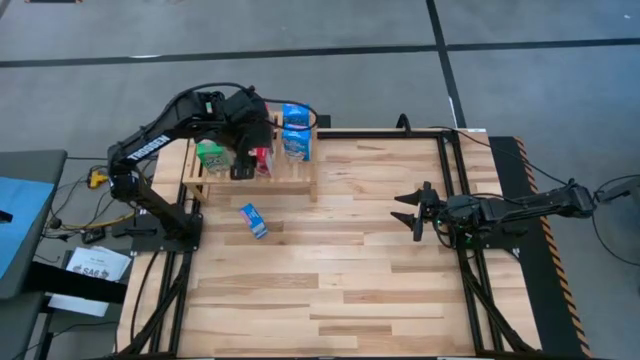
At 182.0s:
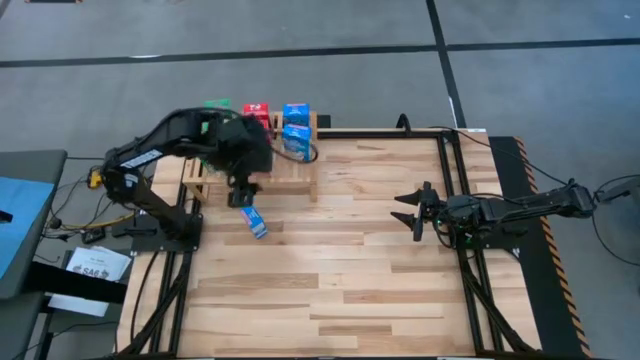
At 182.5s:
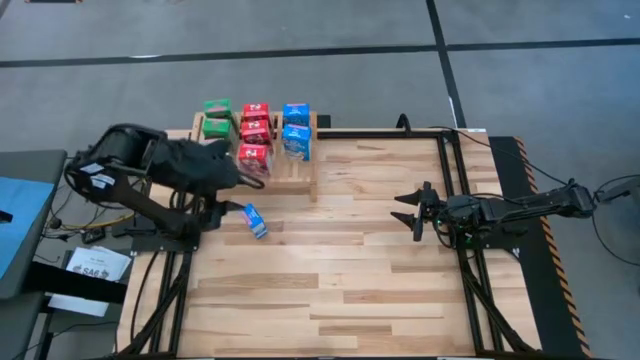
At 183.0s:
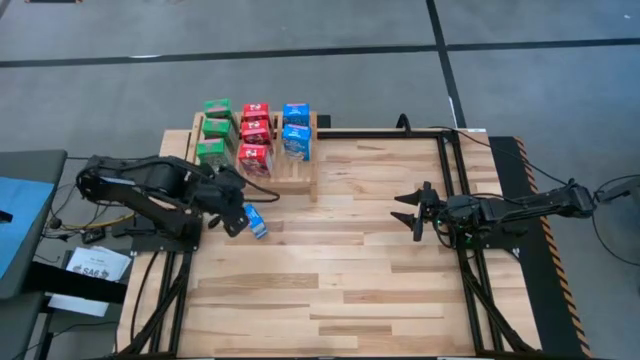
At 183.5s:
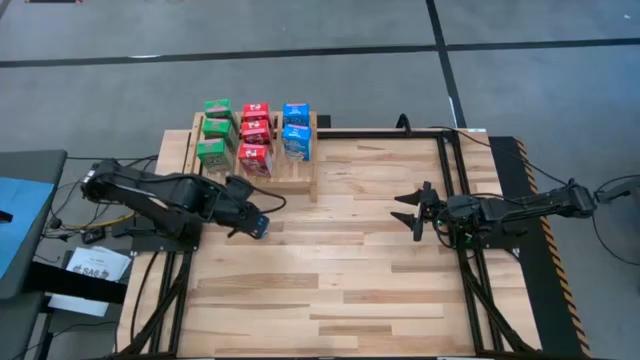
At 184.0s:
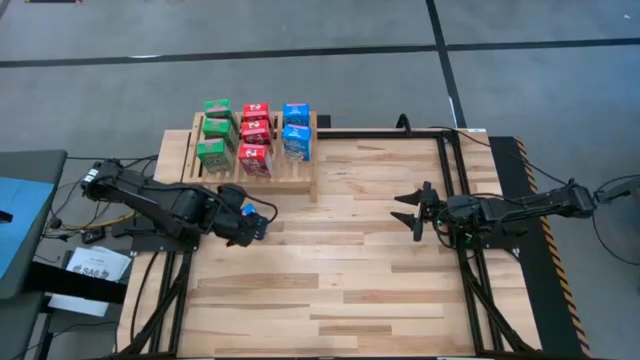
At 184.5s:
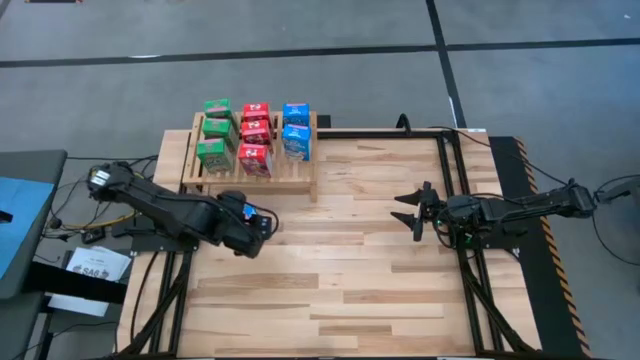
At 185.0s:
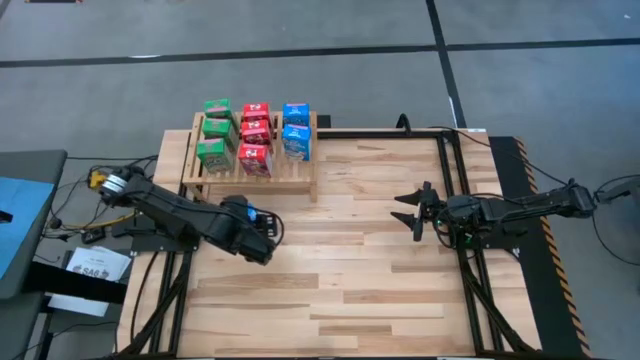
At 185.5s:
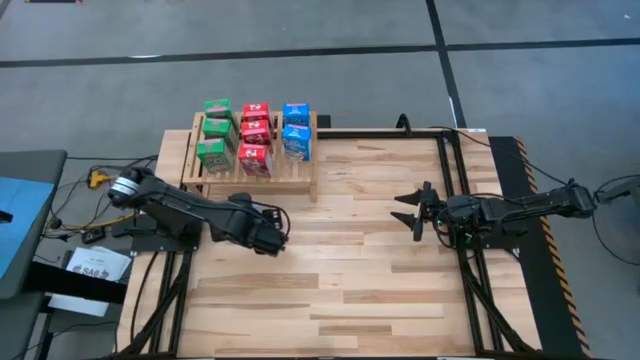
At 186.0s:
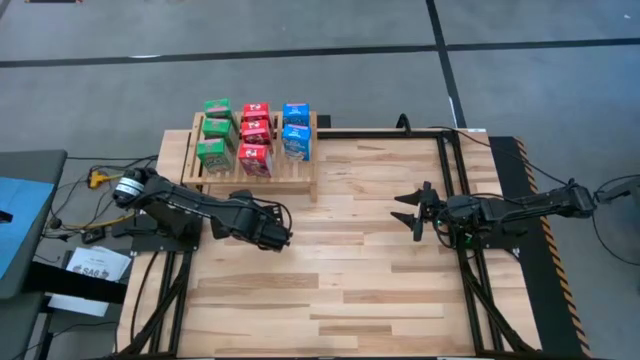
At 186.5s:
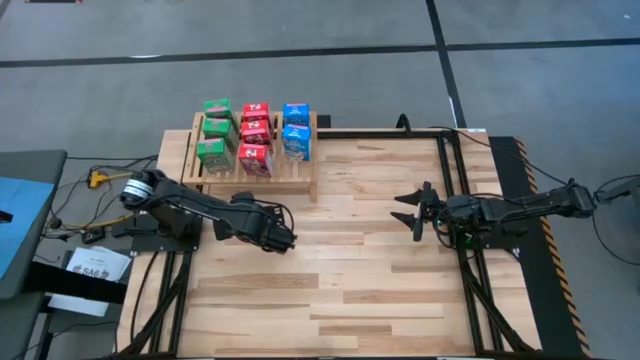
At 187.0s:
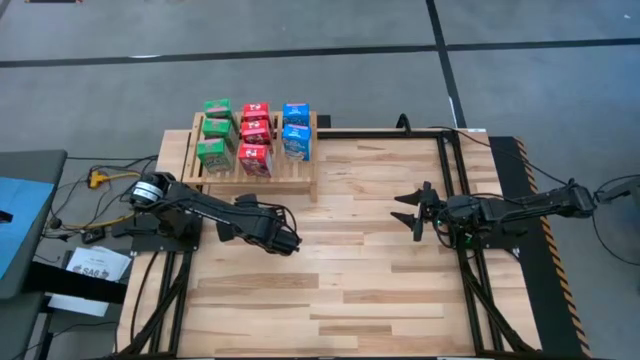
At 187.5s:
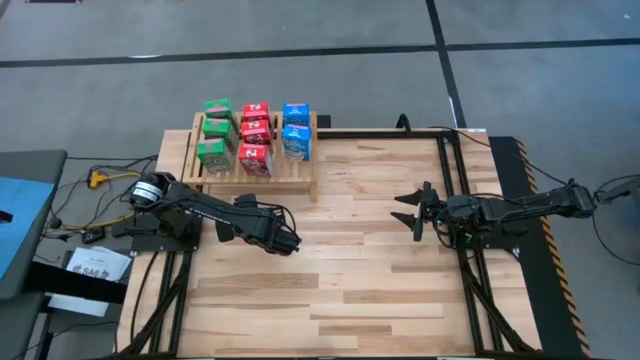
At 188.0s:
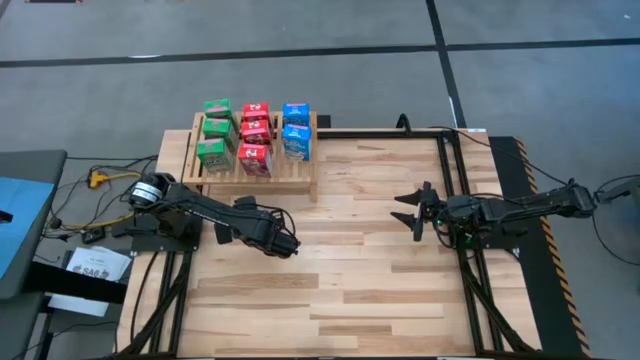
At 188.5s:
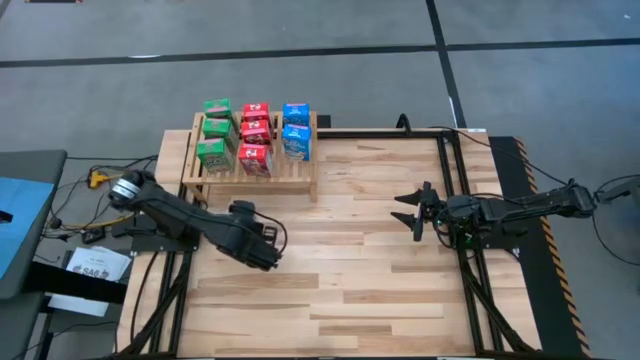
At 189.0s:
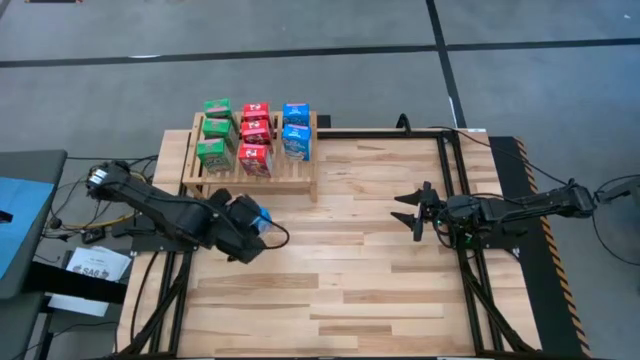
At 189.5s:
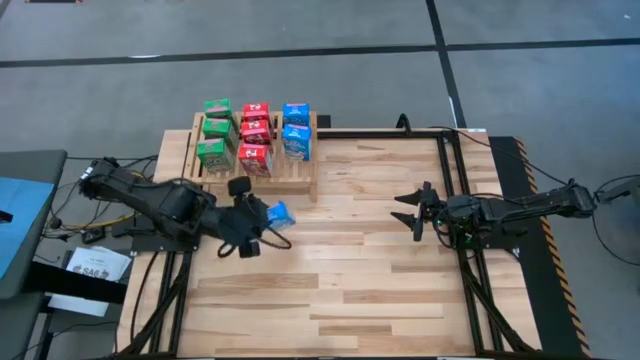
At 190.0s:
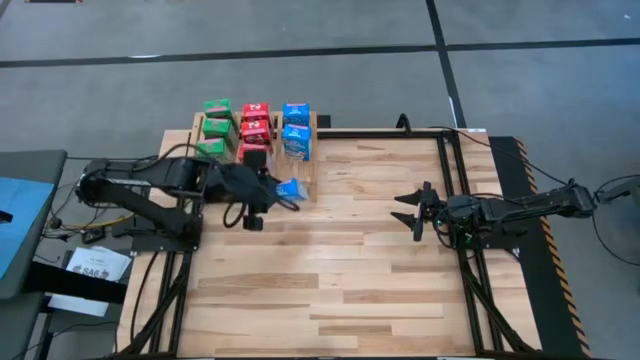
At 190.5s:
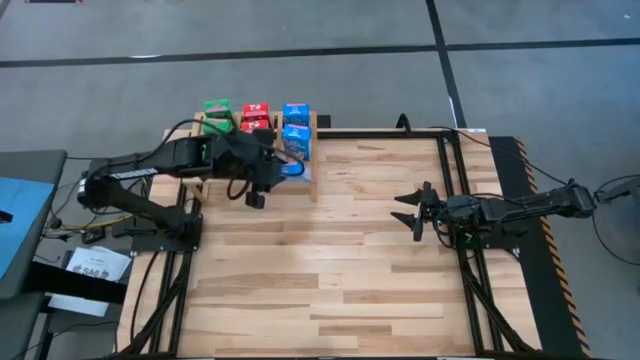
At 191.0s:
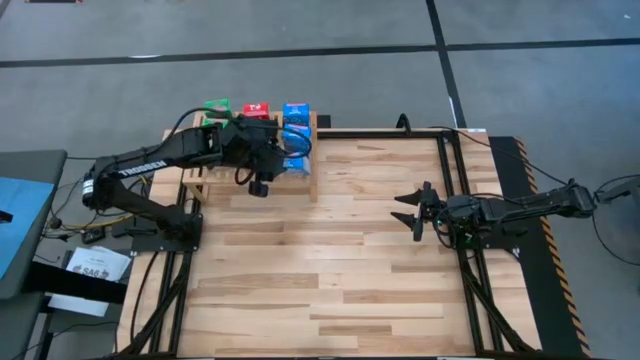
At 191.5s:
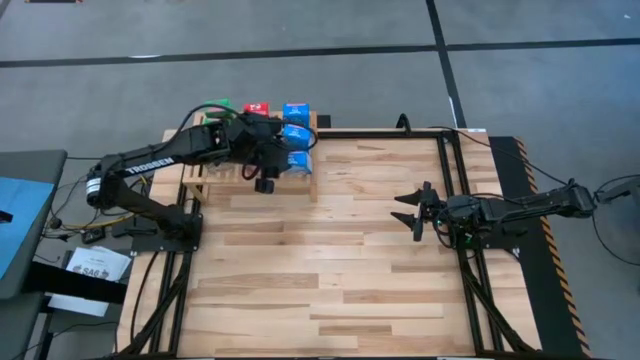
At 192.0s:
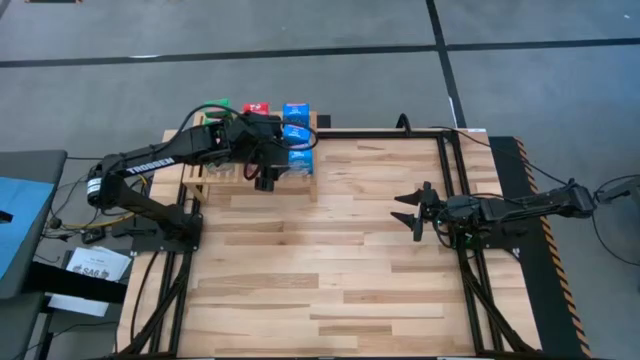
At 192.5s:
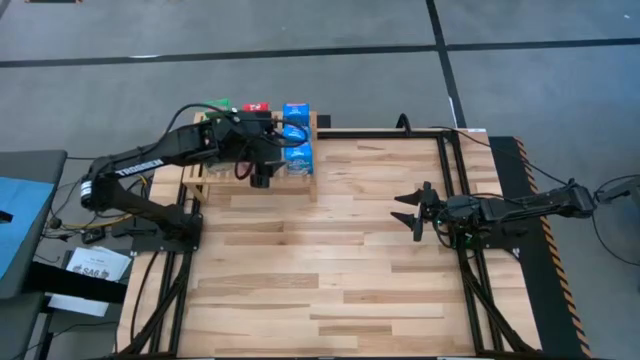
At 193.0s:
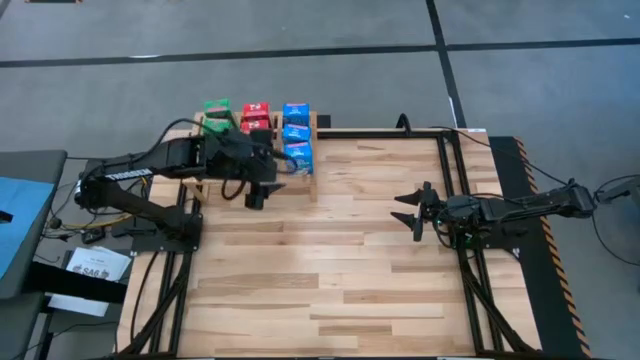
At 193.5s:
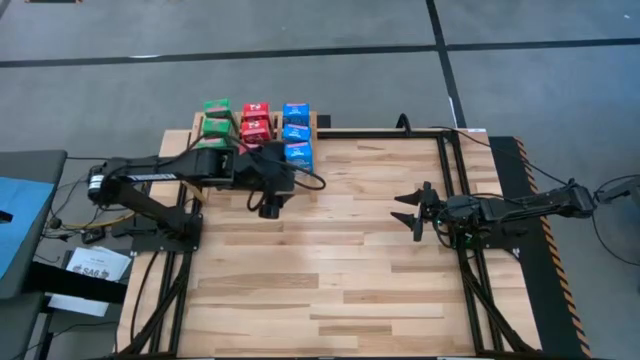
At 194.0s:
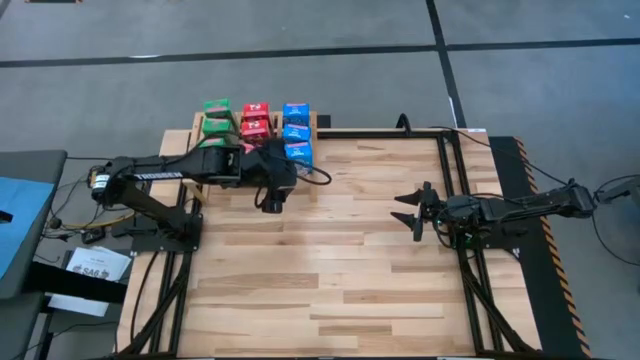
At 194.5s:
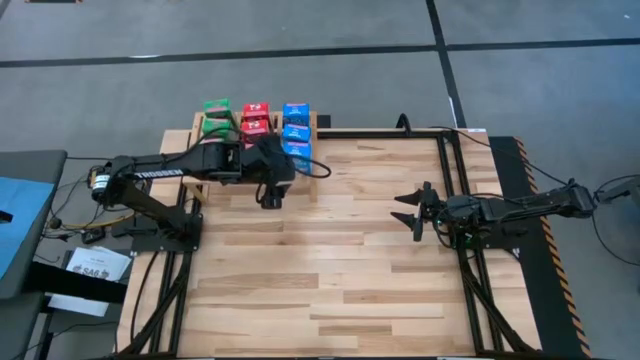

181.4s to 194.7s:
Task: Stack cereal on shelf
Put the blue cereal on the shelf aligned with the other blue cereal box

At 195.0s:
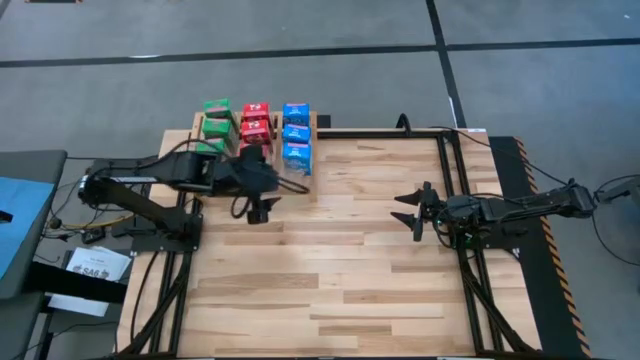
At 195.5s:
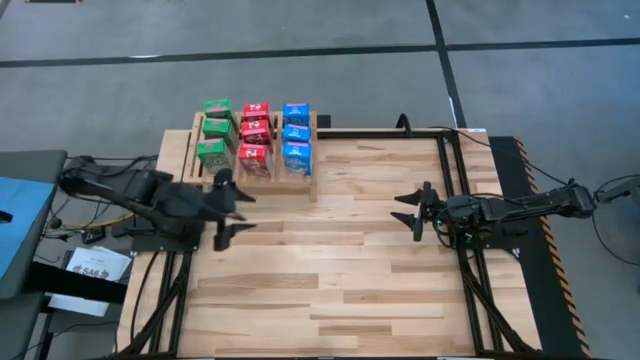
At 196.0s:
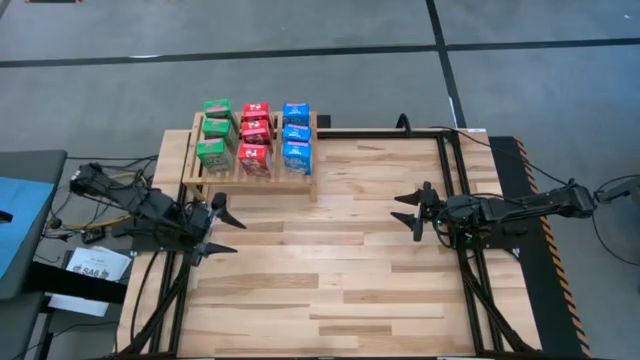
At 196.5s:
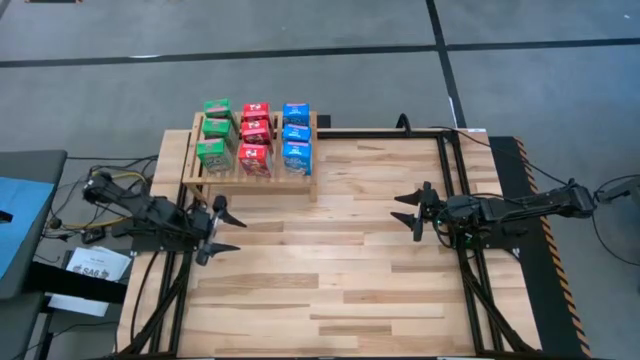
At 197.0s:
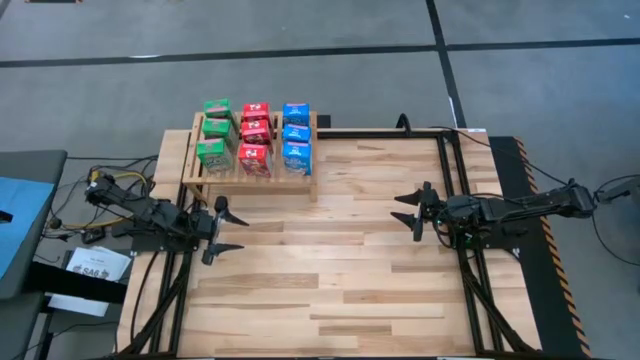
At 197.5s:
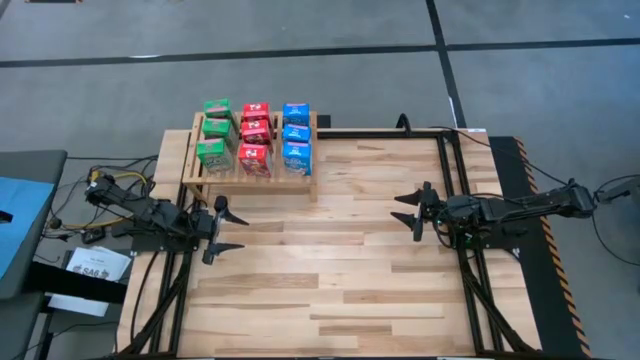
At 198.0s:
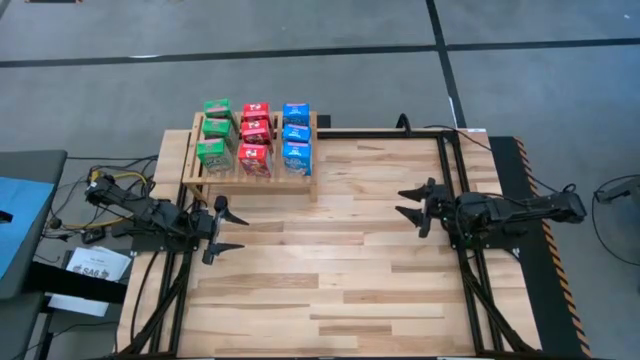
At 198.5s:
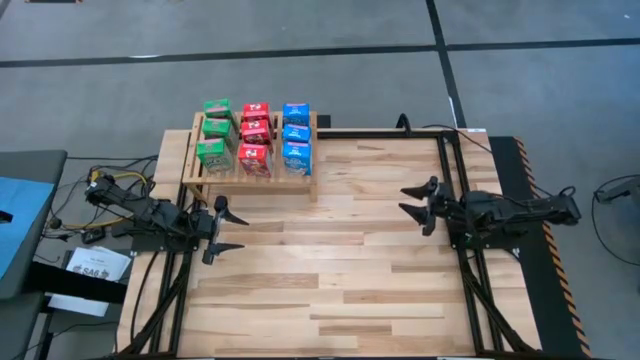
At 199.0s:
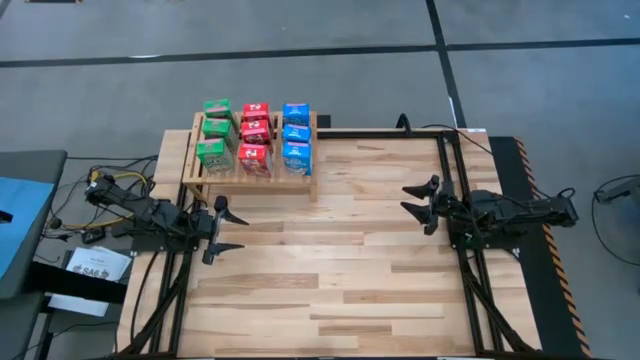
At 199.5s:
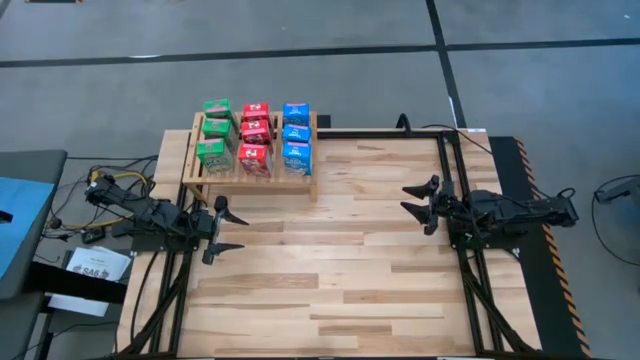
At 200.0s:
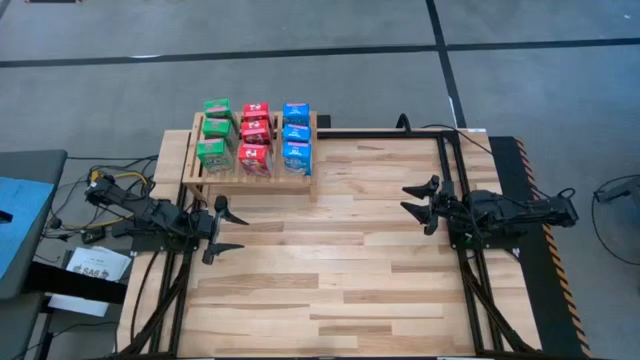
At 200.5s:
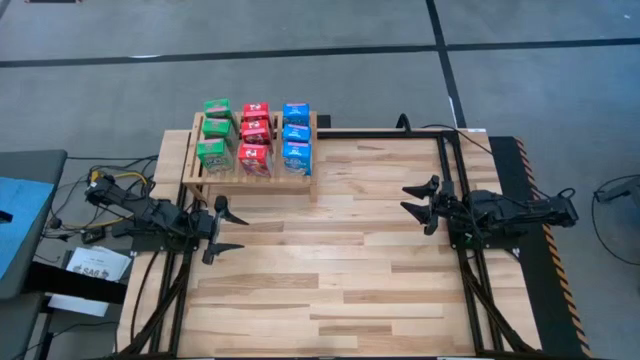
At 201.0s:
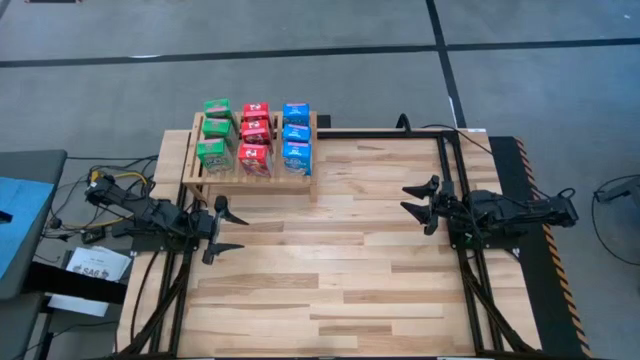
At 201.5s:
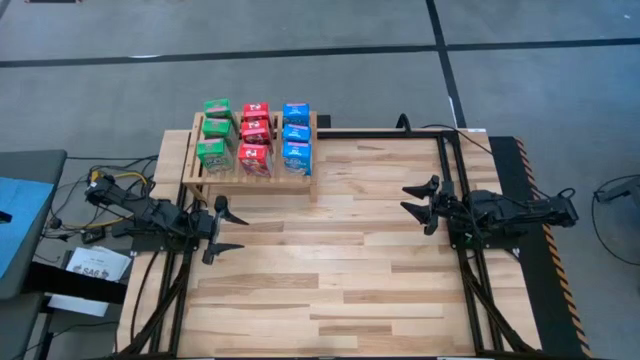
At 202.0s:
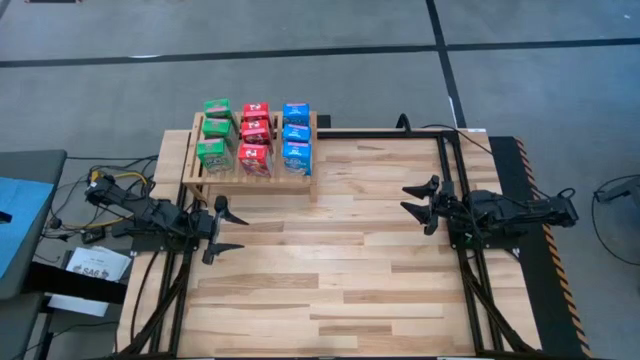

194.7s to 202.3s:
Return to Home Position

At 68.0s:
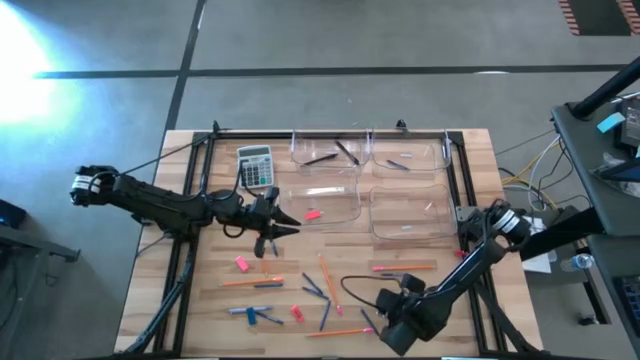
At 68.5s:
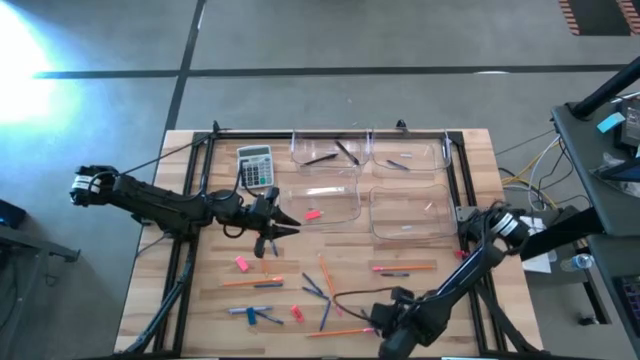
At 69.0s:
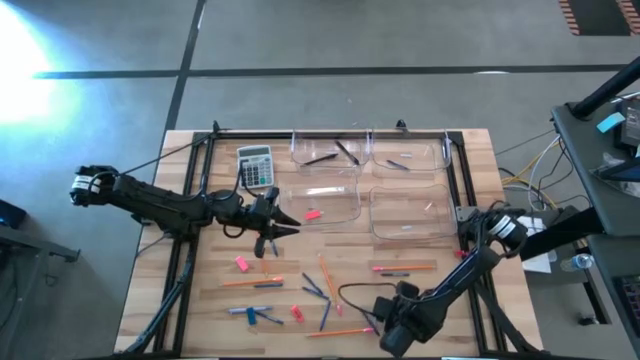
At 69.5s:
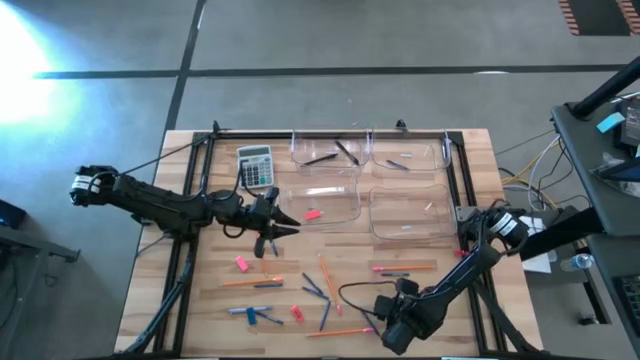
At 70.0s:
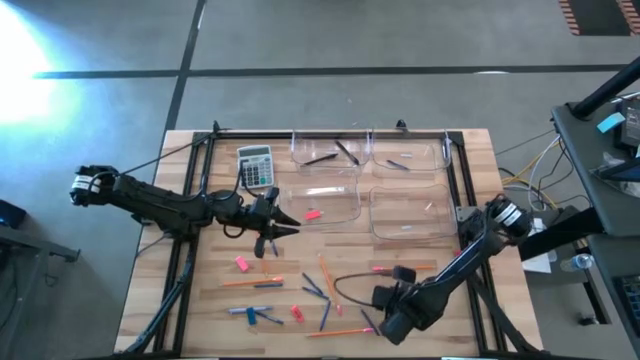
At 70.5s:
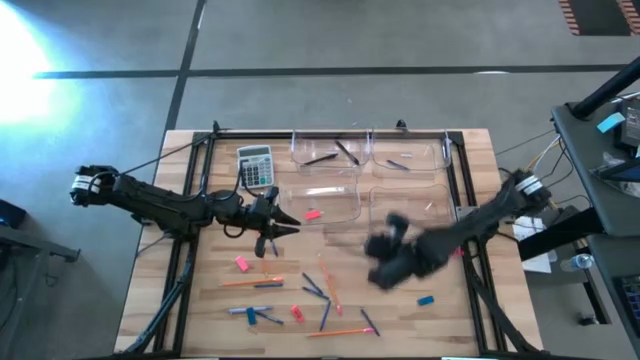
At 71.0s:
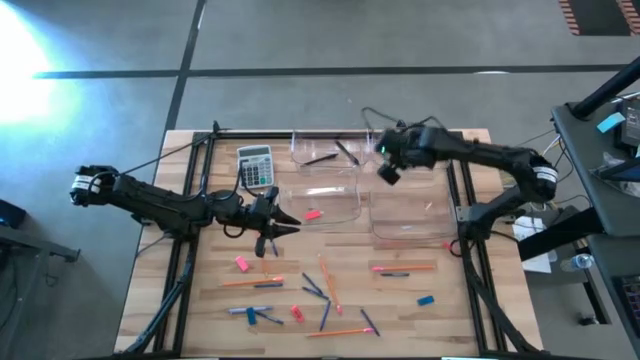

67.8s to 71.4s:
Task: Sort crayons/erasers/pens/pencils in bins
Put the blue crayon into the top right transparent bin
